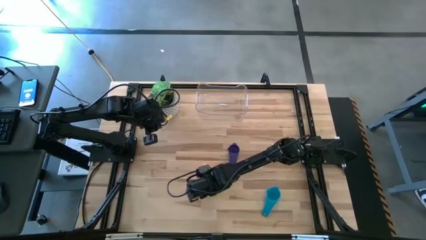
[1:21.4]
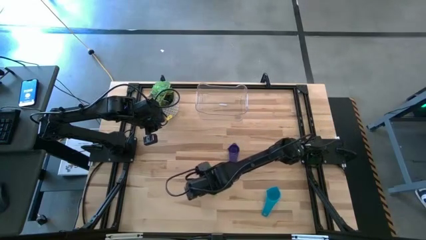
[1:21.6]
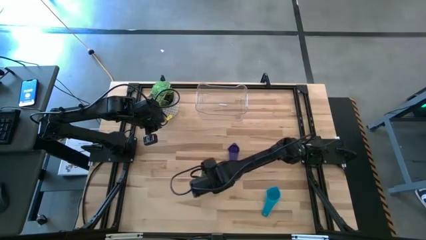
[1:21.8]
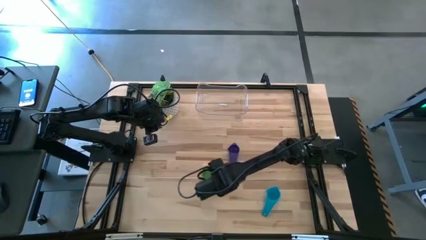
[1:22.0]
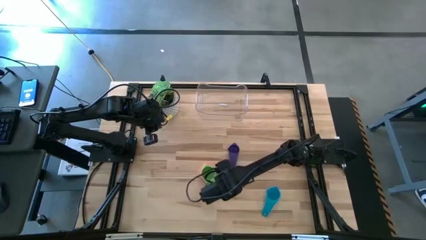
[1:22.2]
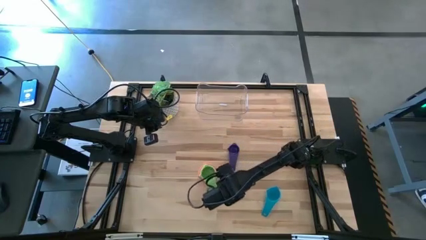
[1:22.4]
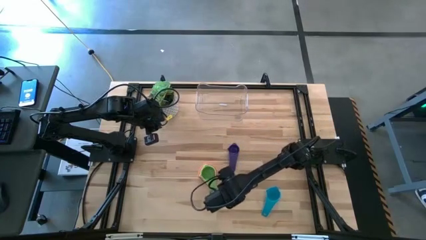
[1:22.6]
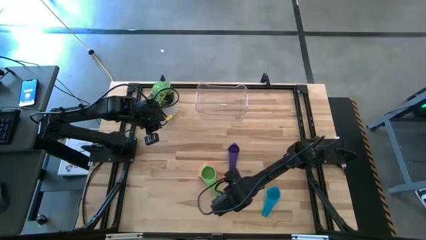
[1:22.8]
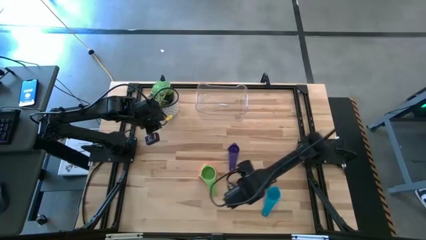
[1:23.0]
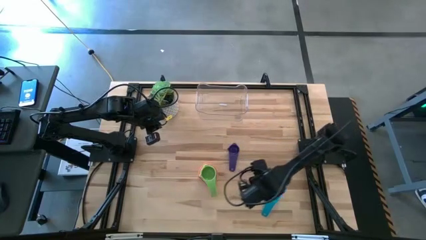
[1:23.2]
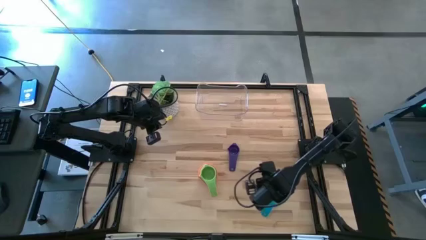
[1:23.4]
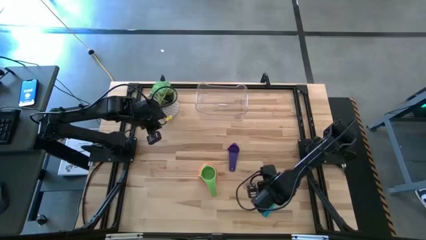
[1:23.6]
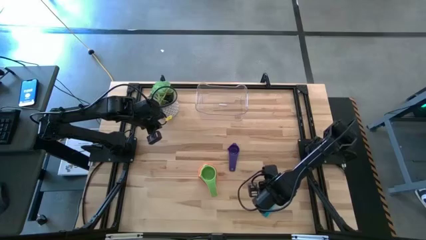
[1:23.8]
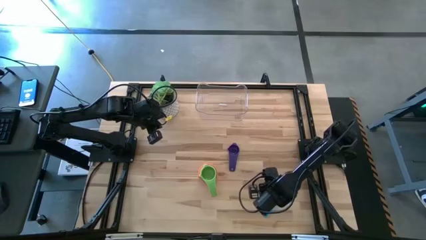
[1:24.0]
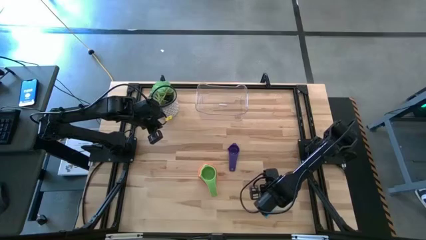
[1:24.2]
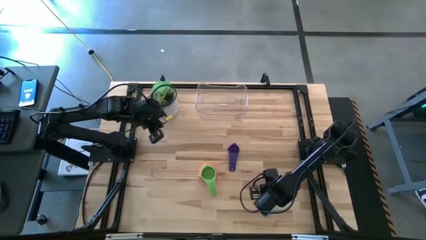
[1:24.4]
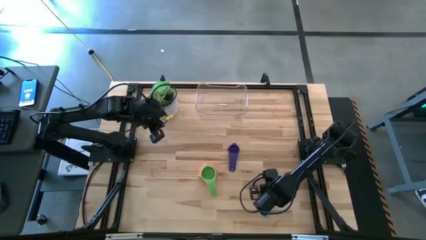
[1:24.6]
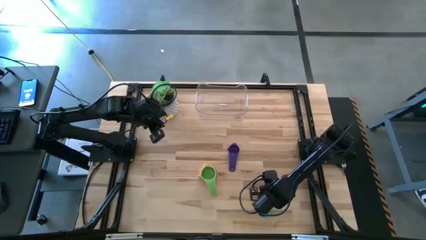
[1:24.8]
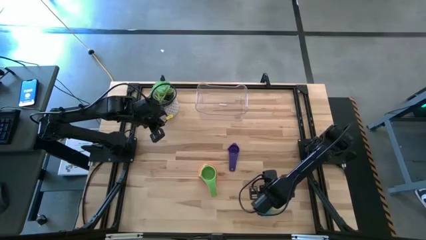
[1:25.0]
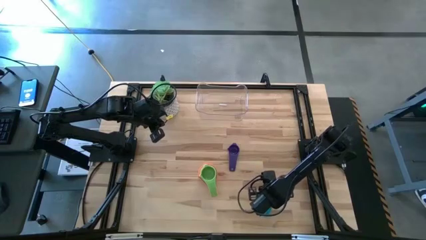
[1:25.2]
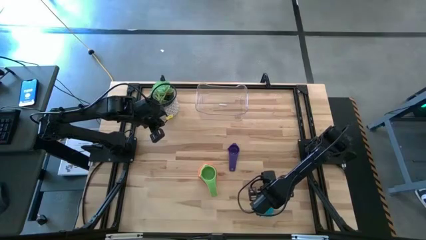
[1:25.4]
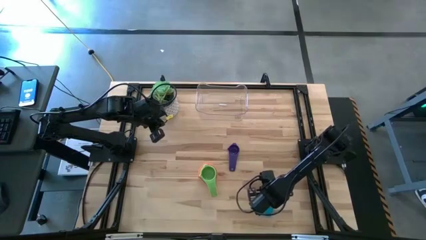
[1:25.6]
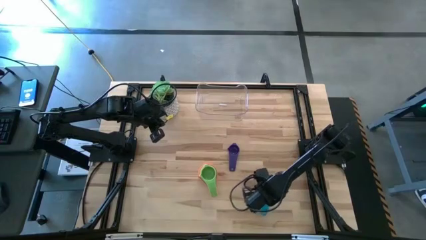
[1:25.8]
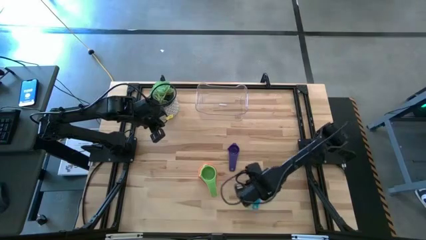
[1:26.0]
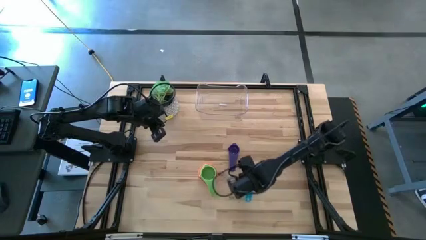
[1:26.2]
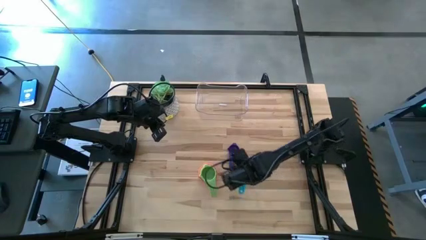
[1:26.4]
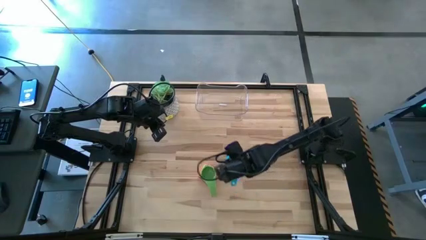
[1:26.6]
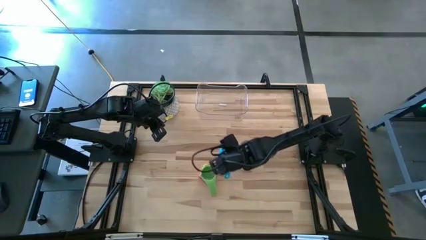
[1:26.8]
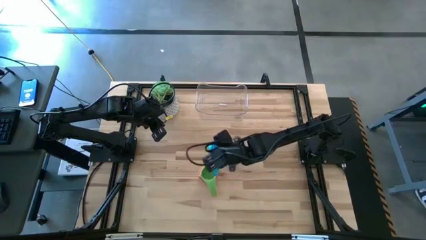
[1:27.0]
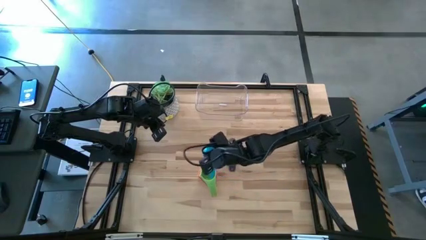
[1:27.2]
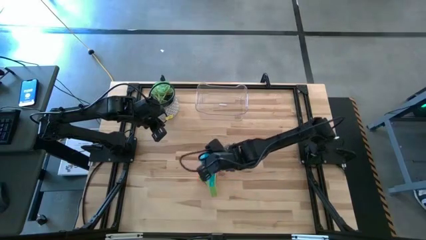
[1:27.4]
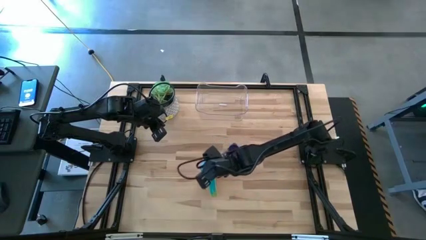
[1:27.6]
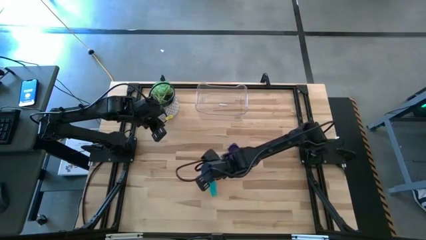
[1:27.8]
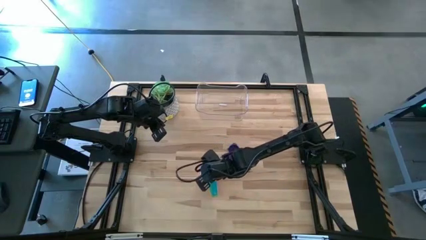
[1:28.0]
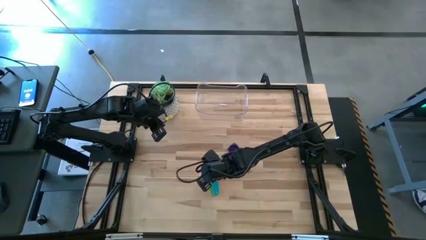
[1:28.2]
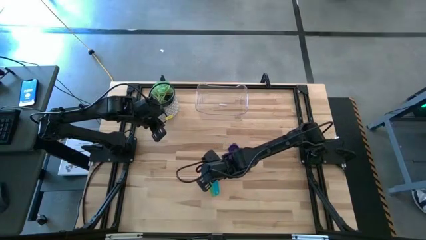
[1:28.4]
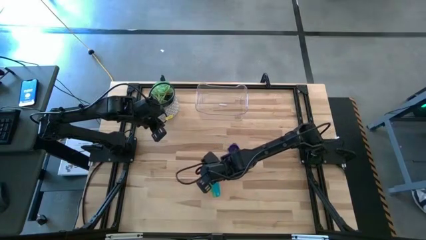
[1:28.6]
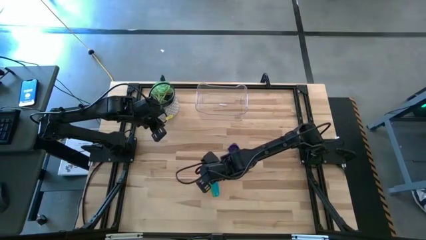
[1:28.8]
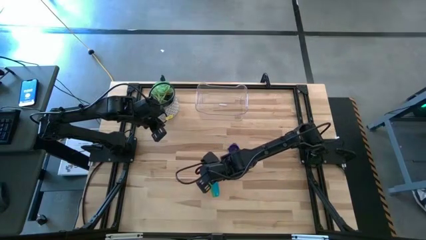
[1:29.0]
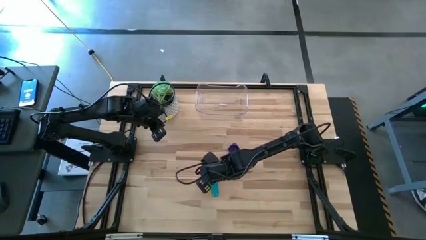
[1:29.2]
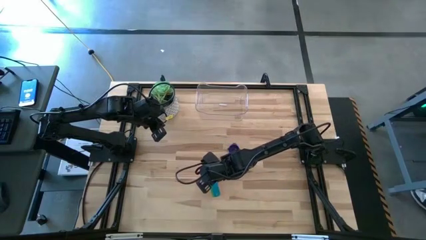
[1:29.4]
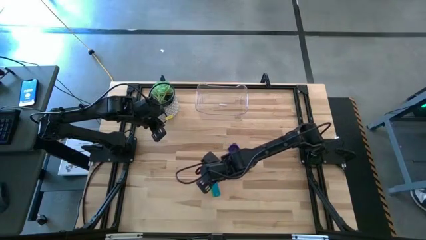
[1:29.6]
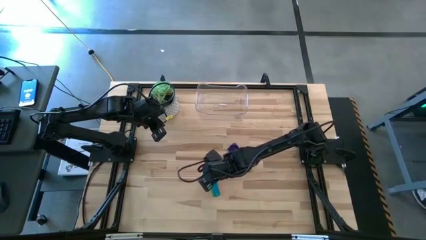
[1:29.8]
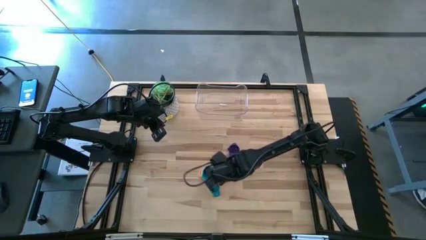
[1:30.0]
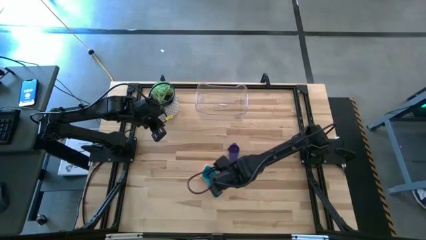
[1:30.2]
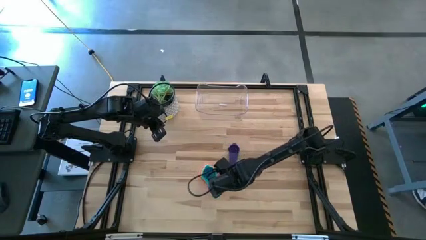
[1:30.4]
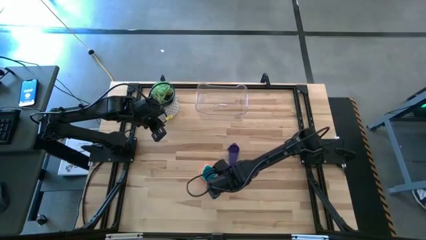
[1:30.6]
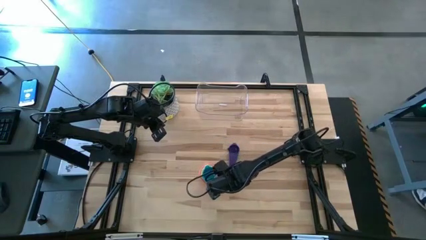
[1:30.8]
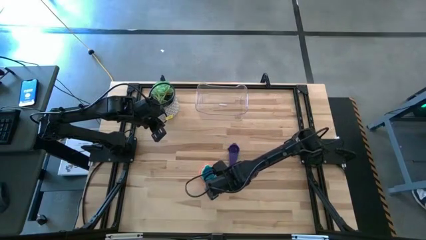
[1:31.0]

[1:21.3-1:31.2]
Task: Nest measuring cups in basket
Stack the light blue measuring cup into the green measuring cup

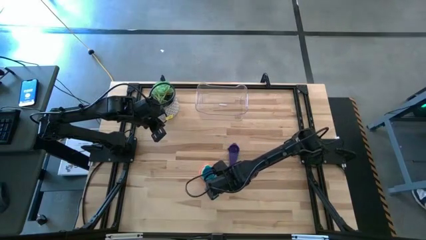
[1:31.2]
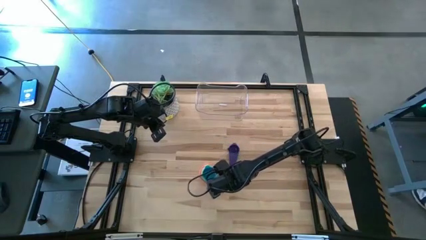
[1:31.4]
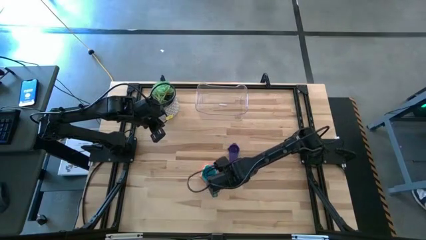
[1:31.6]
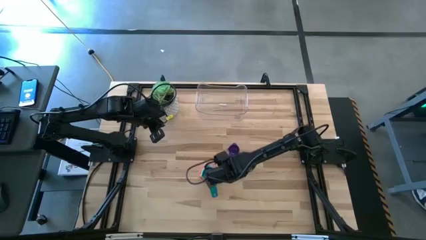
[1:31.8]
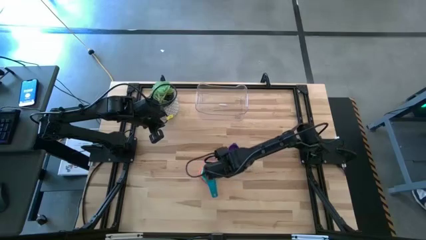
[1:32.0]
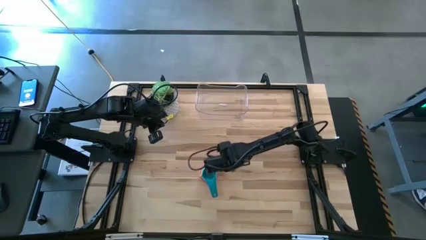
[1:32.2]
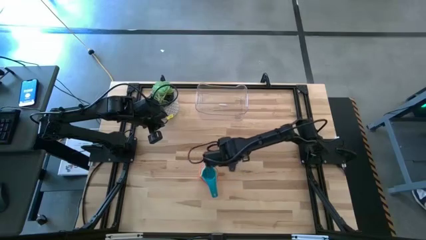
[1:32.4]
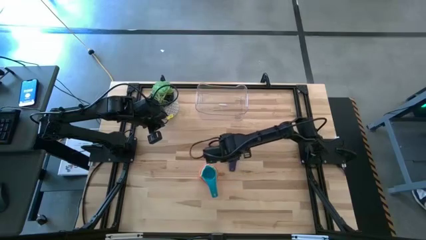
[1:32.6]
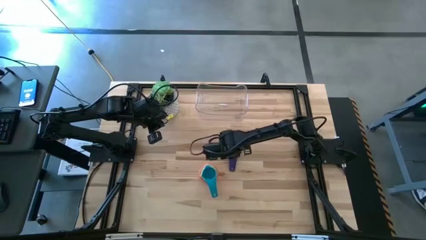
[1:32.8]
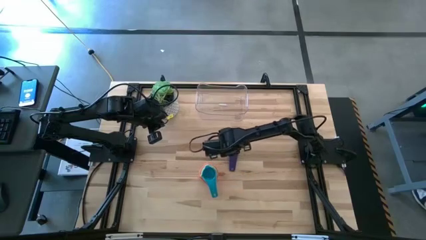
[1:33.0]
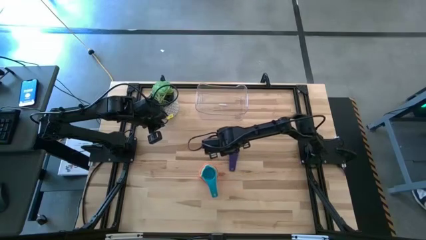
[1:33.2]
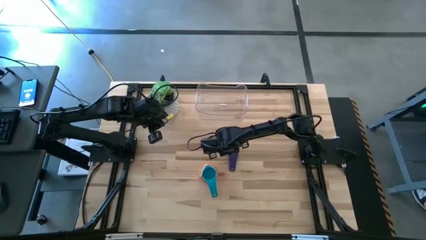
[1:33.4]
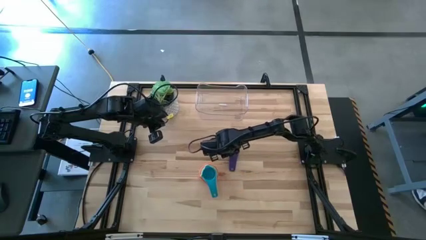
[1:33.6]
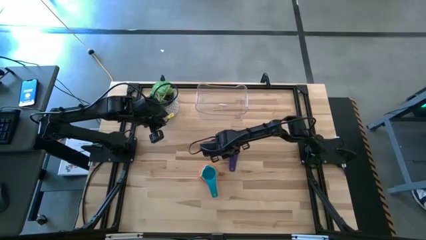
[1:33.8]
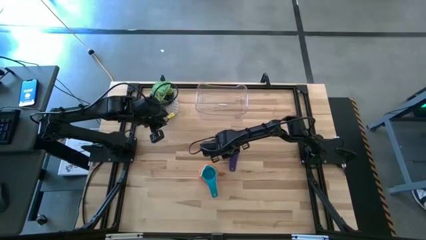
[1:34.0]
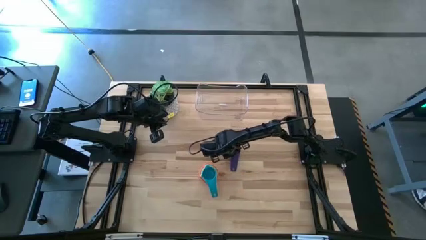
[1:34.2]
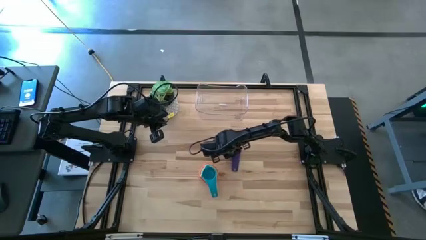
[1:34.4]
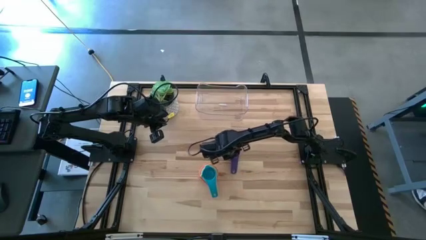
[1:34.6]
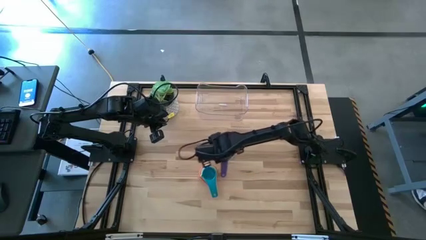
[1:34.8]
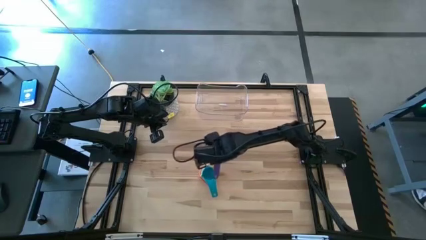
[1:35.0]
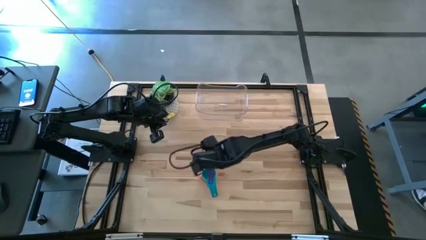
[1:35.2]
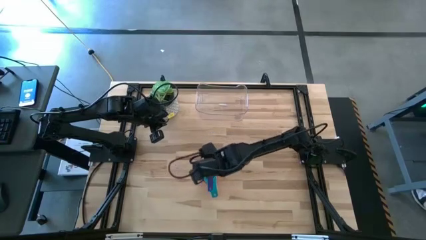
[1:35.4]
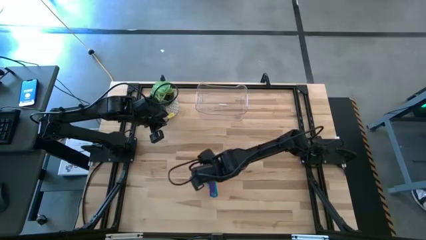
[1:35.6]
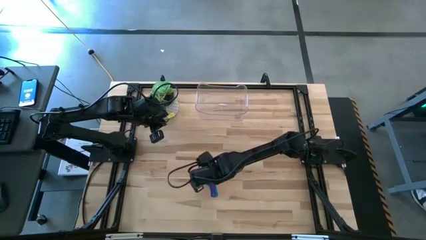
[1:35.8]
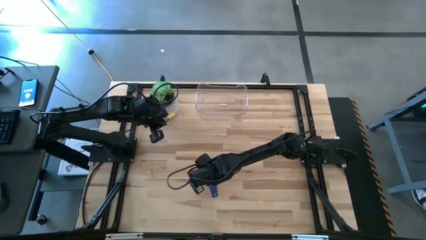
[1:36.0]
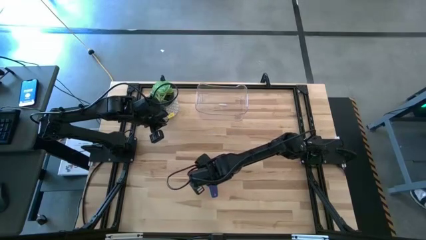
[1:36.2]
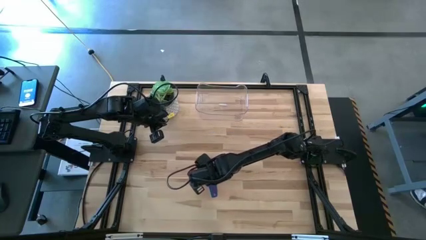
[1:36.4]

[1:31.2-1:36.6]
Stack the blue measuring cup into the light blue measuring cup

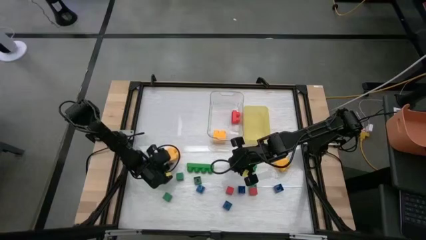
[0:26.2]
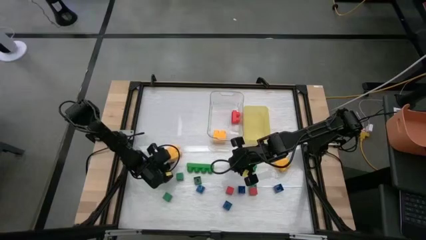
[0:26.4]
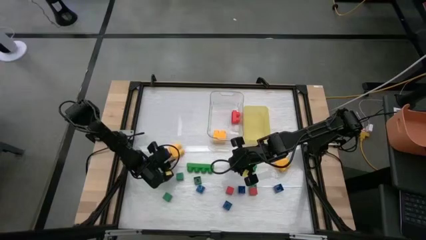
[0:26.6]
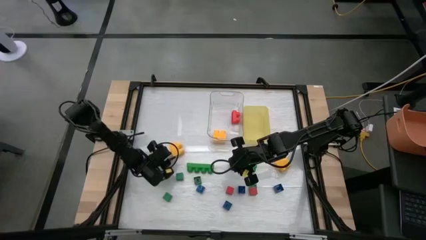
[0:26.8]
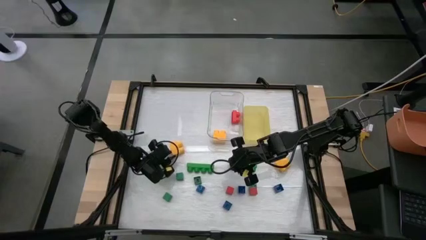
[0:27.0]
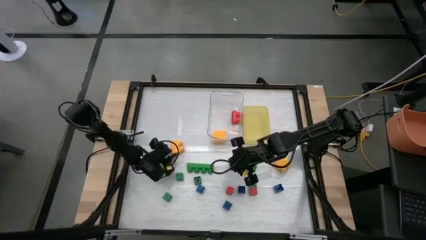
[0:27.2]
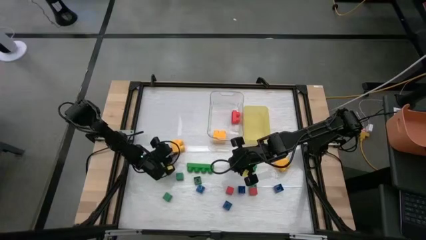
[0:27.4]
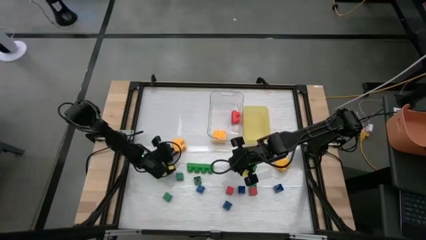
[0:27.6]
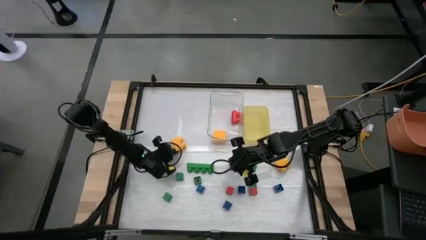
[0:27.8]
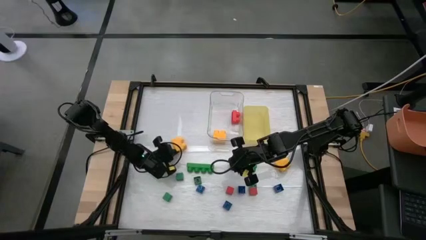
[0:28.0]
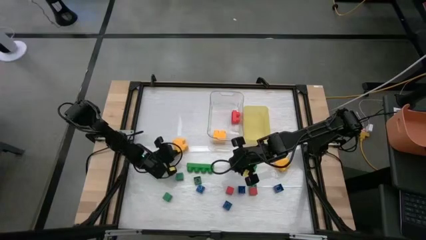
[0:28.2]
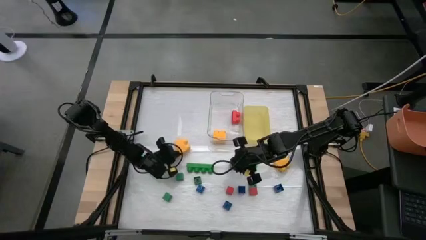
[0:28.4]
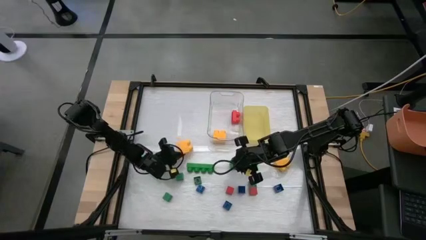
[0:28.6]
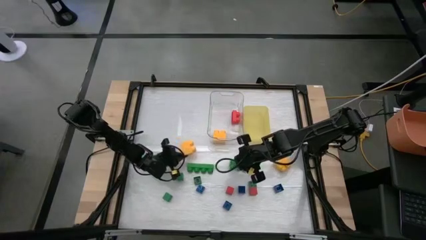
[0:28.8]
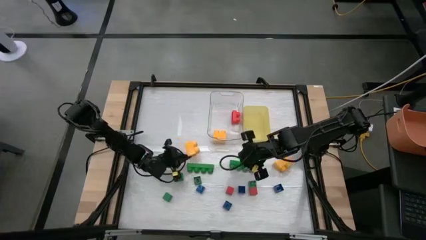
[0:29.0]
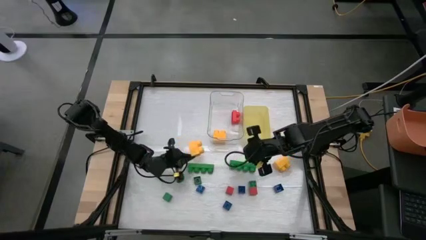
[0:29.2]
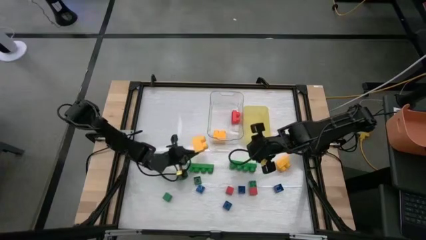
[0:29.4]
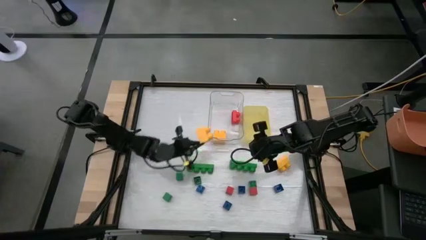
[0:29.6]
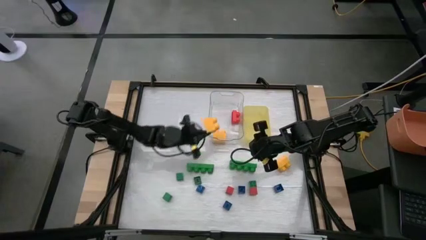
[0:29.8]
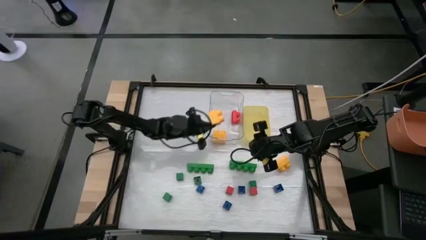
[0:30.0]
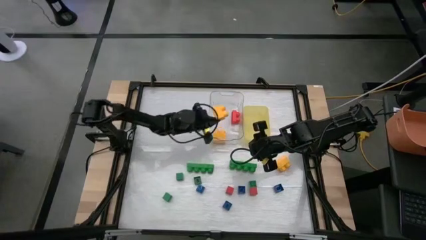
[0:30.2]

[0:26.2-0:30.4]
Task: Sort blocks by size
Put the large yellow game piece into the transparent bin
